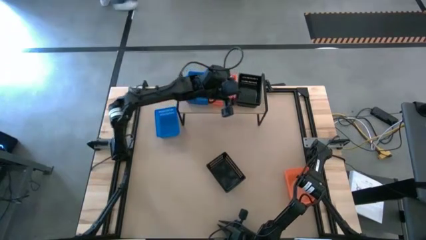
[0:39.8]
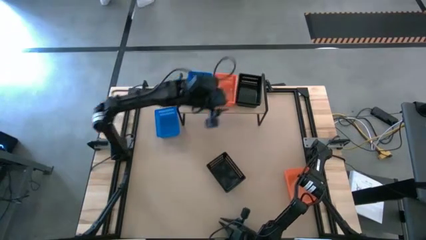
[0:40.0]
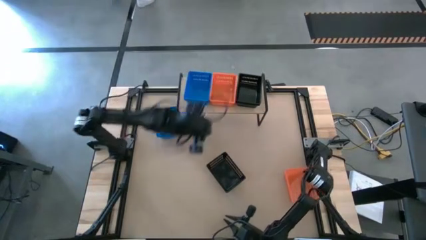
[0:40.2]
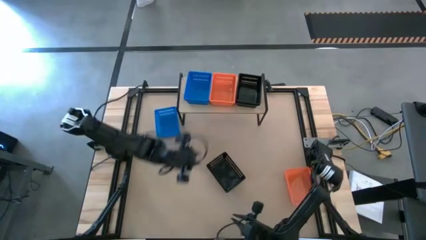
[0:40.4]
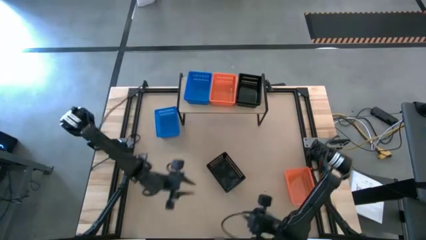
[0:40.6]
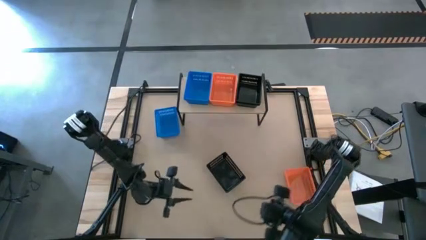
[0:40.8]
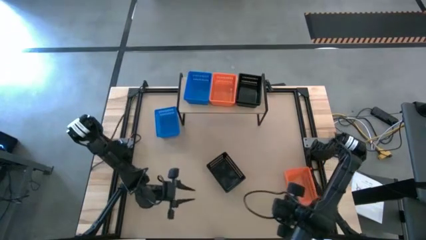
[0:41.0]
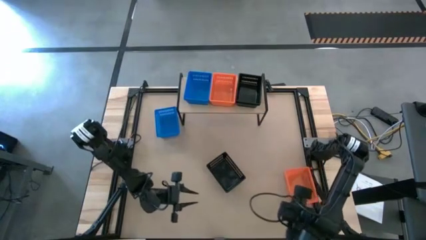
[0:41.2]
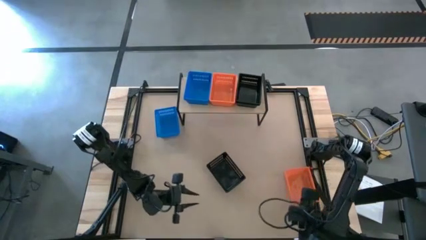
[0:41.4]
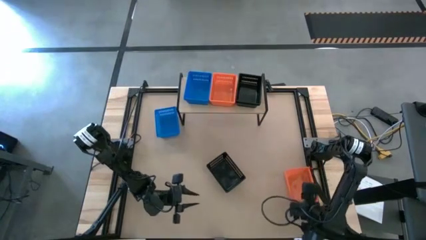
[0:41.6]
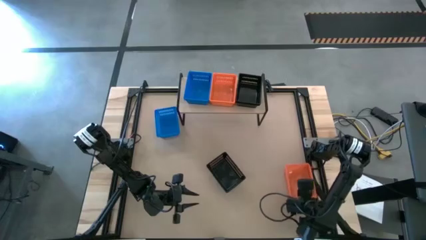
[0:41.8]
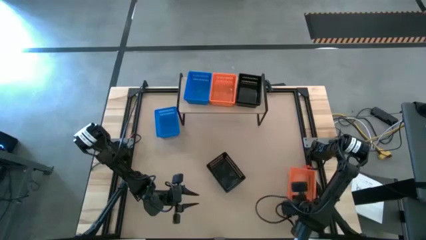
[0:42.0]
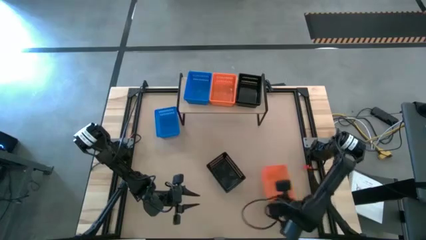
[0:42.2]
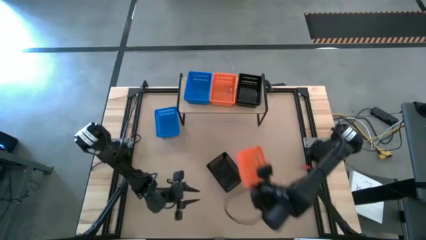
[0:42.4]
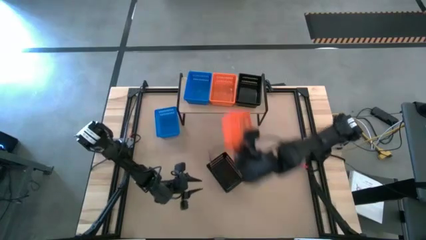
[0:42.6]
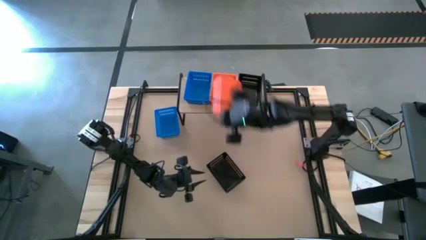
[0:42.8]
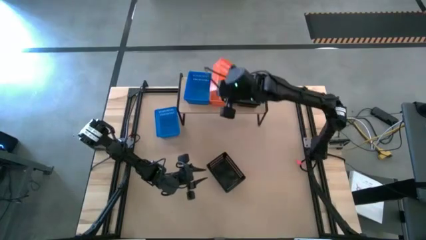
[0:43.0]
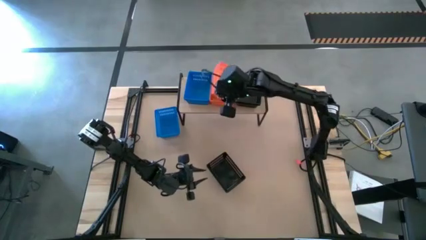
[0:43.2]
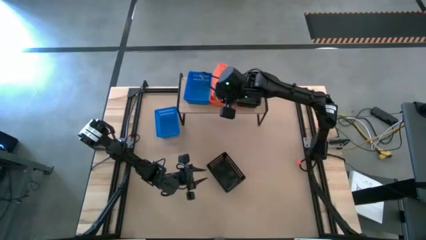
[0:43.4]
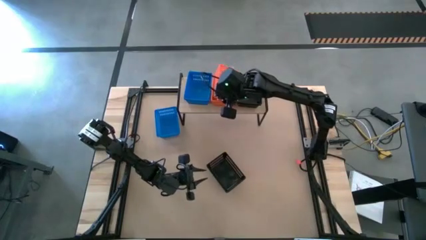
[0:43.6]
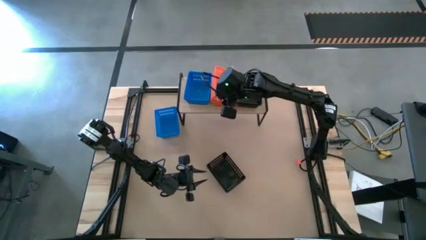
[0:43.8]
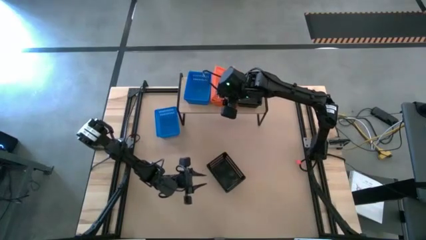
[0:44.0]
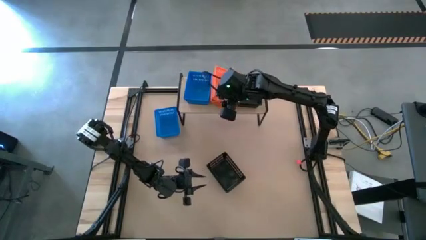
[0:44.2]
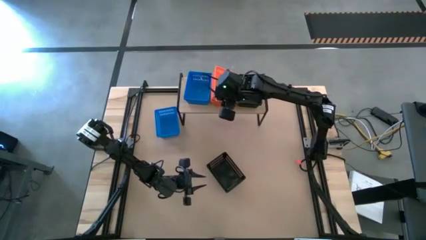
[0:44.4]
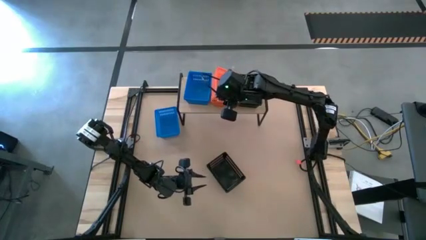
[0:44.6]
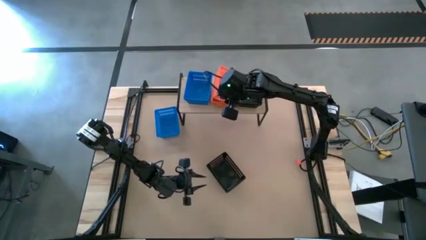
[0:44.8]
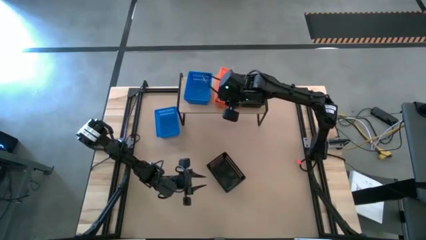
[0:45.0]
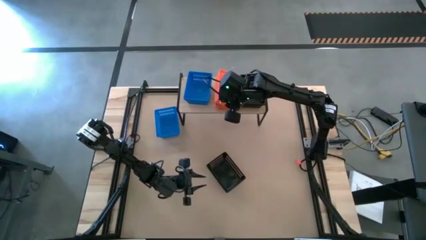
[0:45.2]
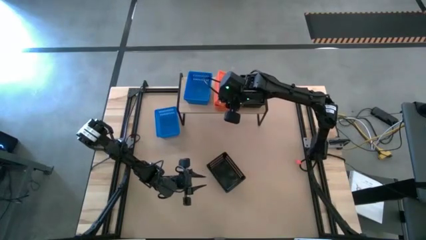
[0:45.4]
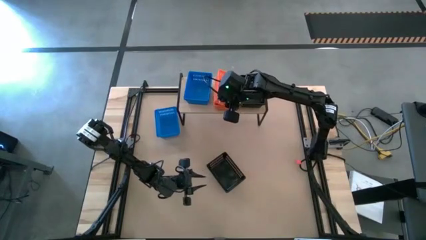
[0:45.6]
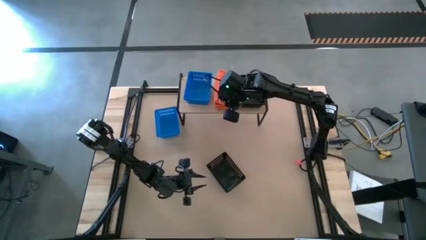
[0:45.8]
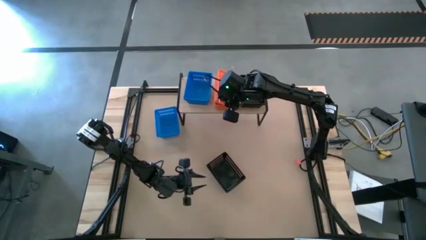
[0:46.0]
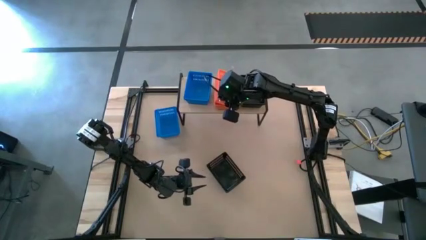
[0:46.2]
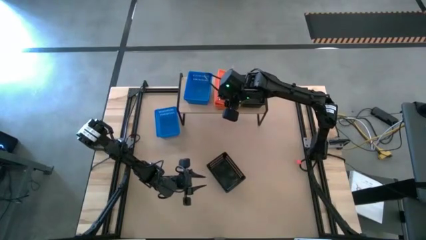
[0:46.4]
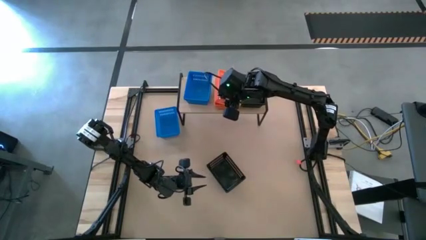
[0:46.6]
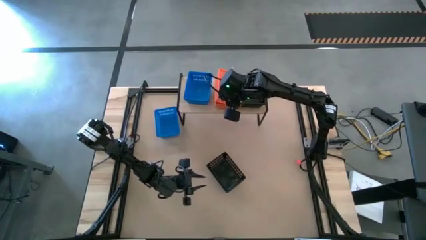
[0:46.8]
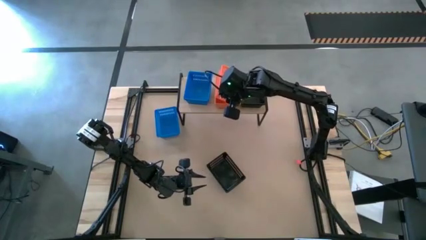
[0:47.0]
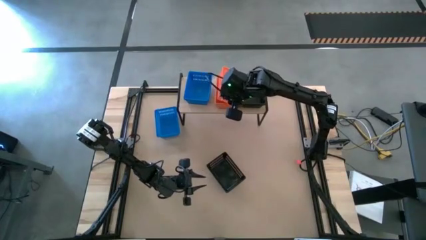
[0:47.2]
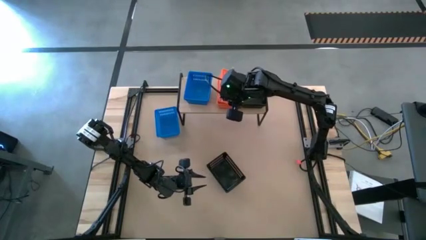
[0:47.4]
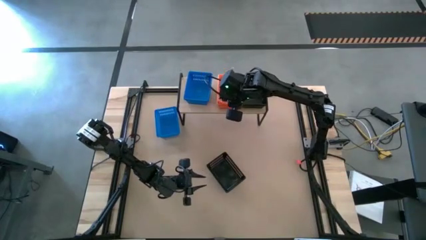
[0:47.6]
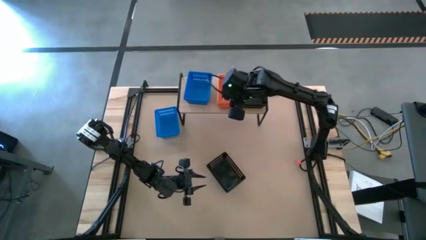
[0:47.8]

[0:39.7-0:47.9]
Task: Stack baskets on shelf by color
Stack the orange basket on top of the orange basket on the shelf

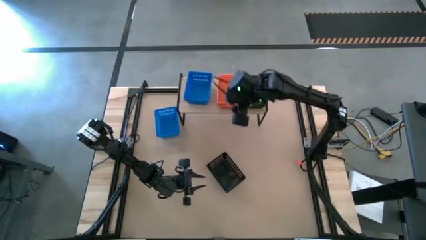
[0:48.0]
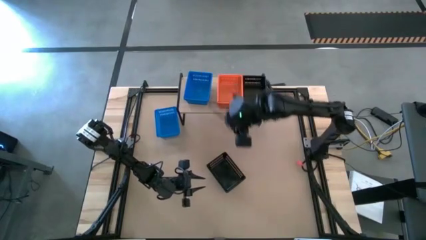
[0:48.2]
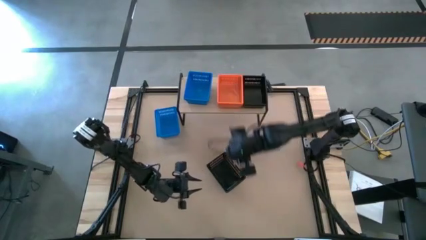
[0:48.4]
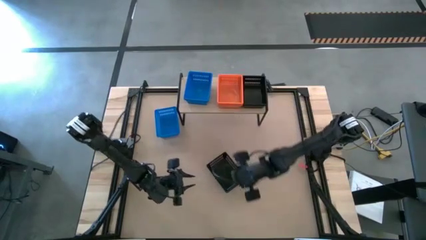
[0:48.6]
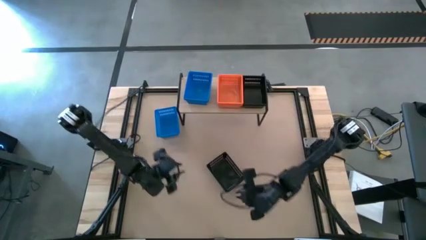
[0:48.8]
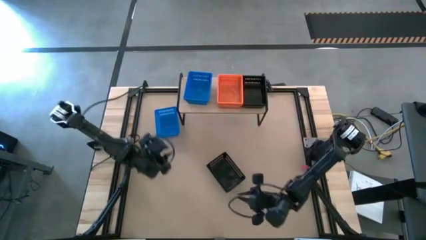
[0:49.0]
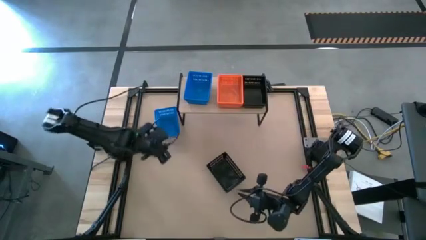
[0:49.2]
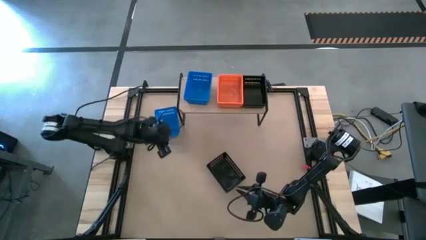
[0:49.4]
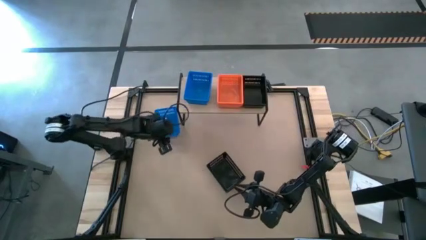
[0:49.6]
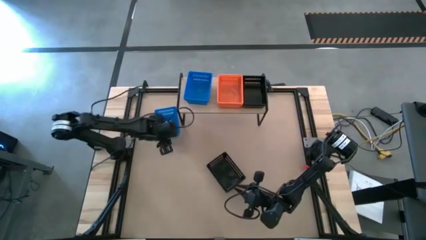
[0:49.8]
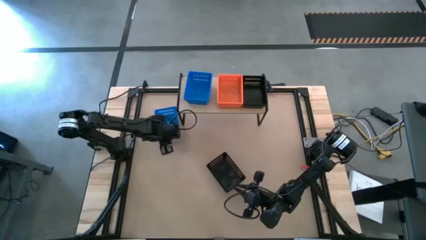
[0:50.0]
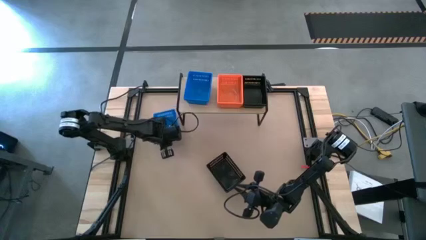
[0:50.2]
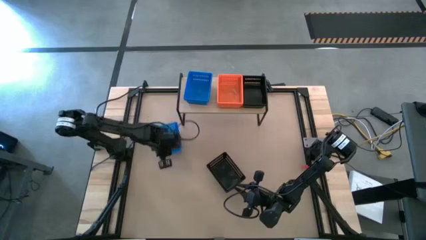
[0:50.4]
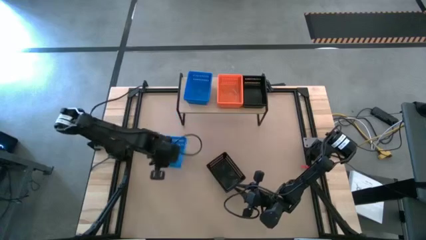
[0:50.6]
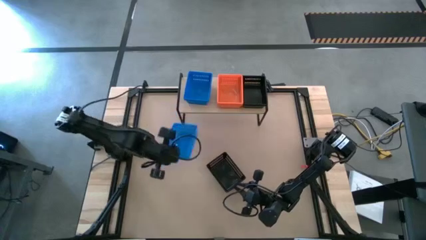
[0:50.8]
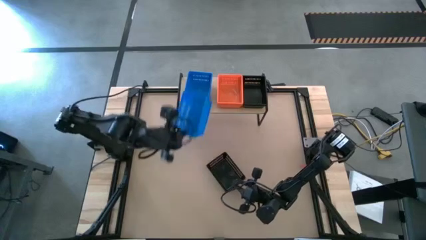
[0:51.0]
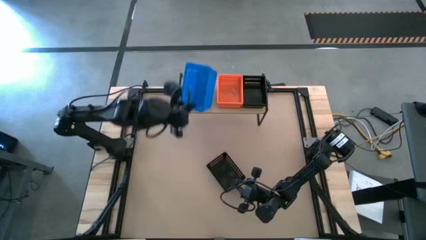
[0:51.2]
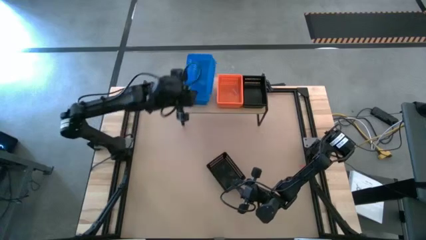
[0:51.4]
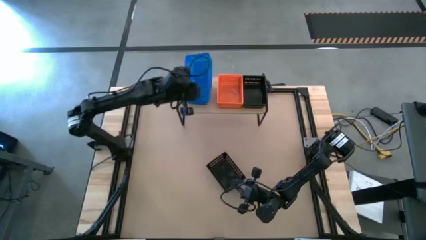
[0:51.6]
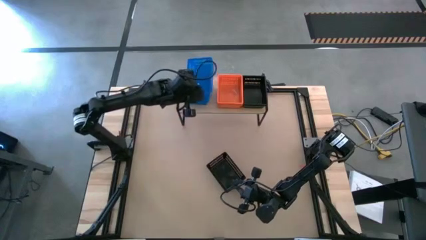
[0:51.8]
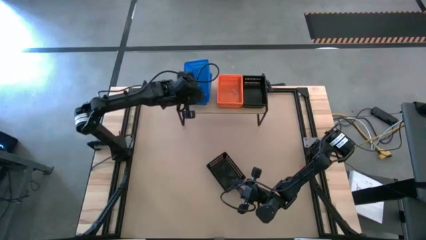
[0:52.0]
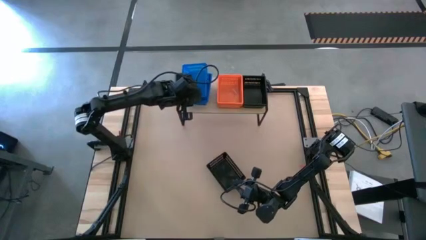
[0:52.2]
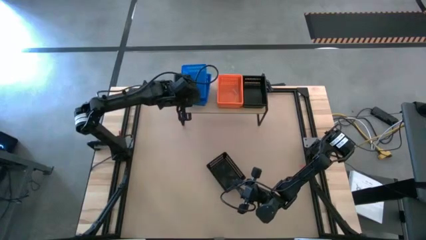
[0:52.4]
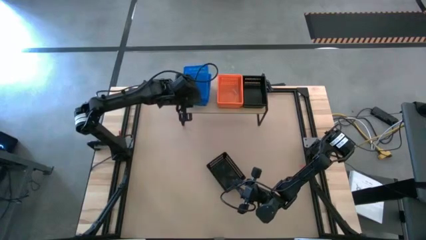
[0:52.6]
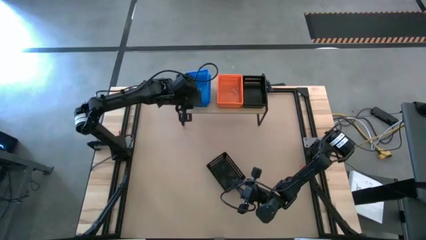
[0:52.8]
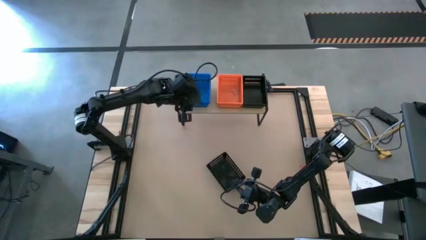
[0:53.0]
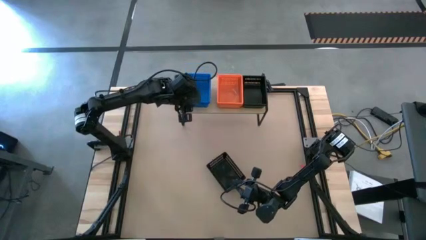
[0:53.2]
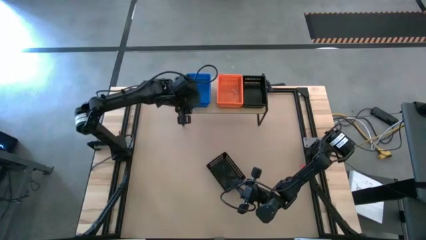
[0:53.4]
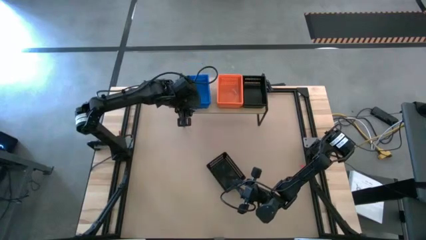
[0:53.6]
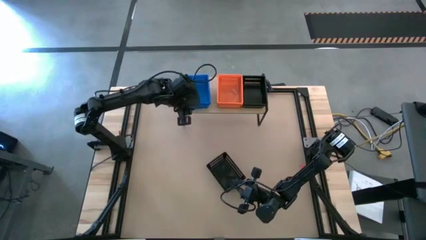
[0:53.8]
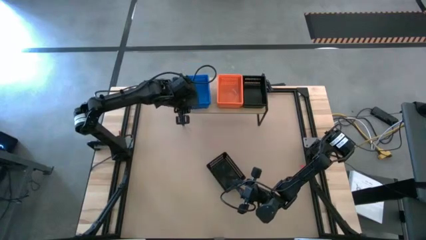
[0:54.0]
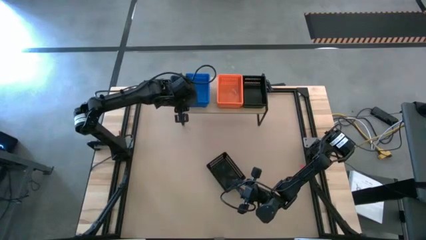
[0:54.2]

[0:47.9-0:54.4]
Stack the blue basket on top of the blue basket on the shelf

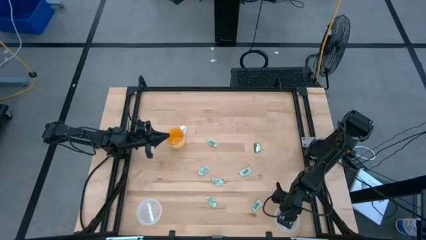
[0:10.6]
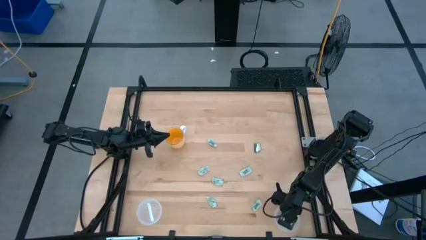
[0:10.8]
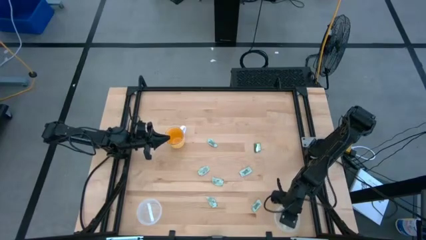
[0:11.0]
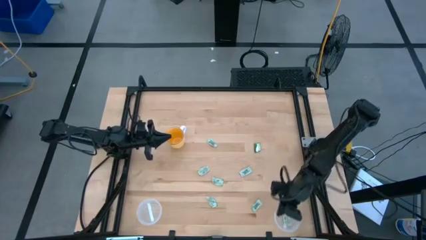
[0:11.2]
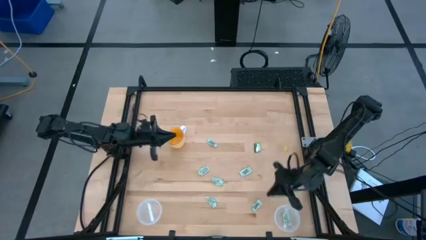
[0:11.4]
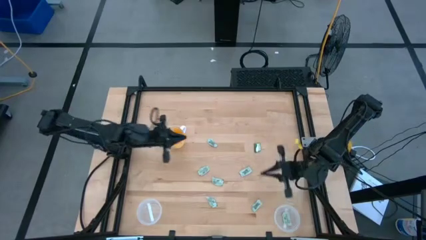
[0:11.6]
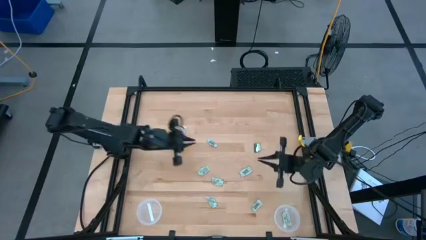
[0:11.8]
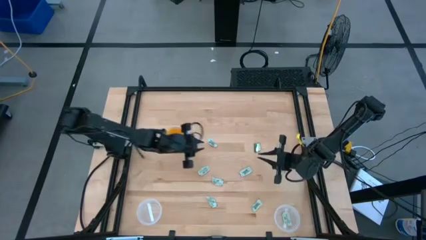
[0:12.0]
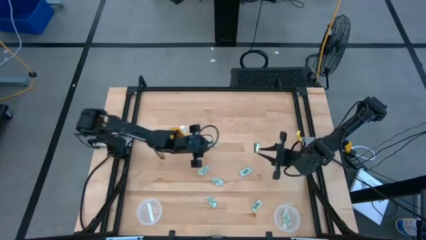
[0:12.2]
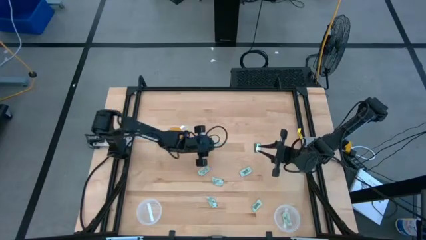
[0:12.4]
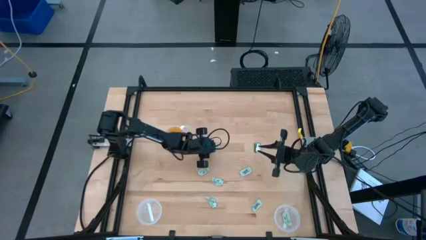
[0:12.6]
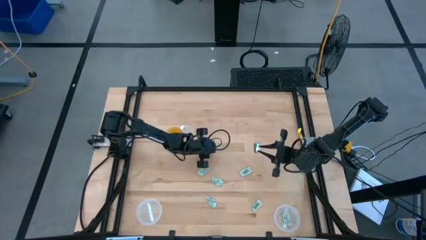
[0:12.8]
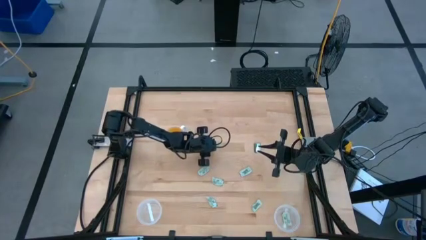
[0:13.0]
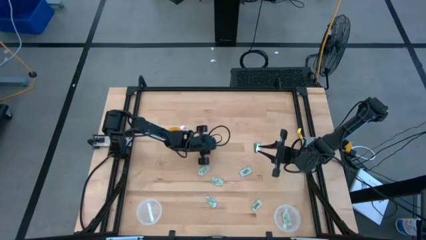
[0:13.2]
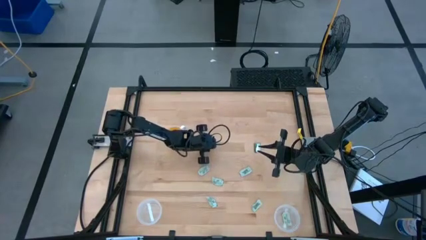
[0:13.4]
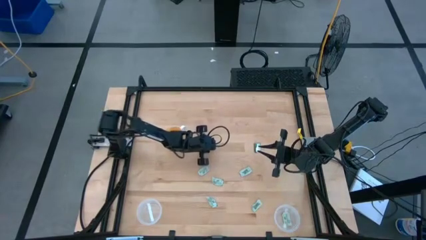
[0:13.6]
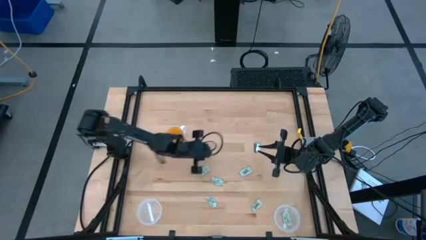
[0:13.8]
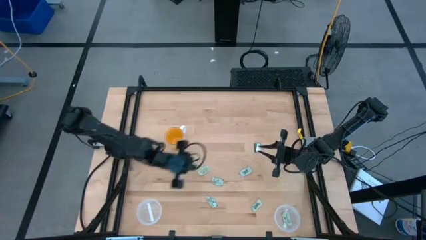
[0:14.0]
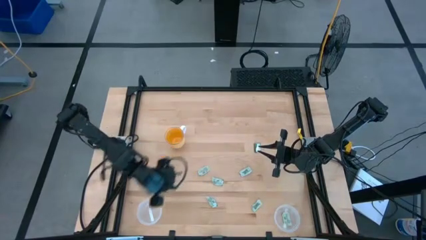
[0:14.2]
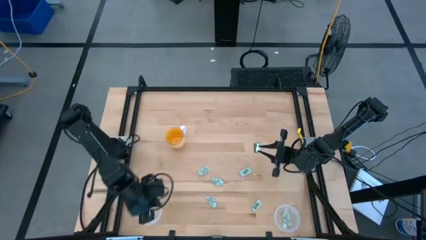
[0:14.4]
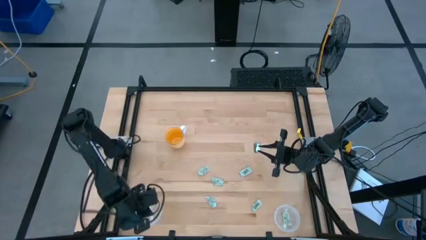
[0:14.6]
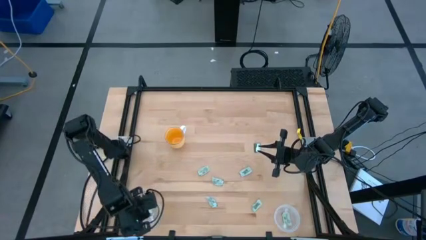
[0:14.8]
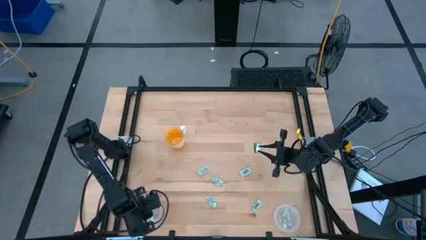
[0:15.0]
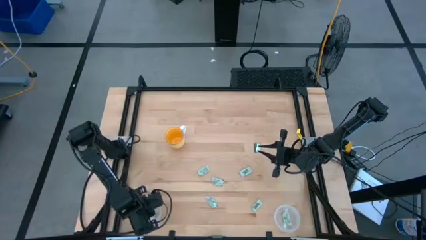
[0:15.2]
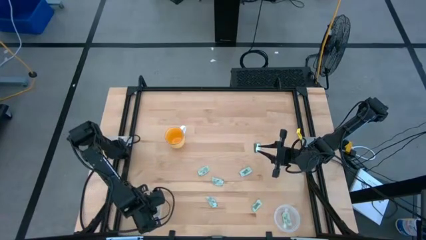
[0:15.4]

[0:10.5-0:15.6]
Task: Pick and place items into bin
Put the stevia packet into the left transparent bin
